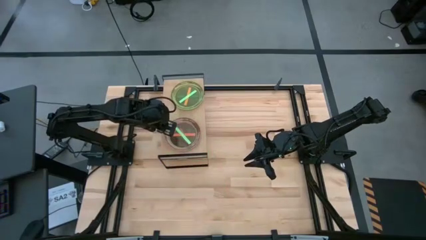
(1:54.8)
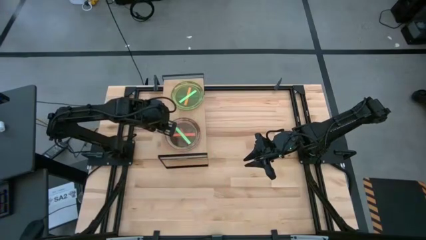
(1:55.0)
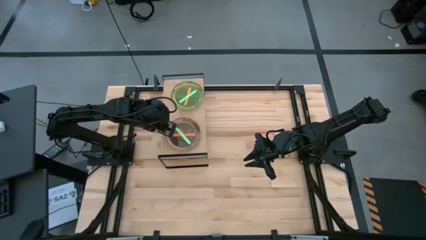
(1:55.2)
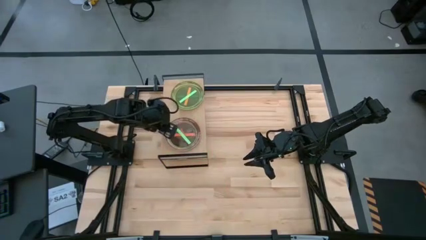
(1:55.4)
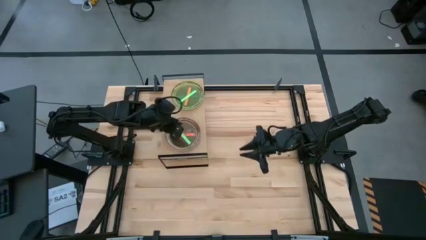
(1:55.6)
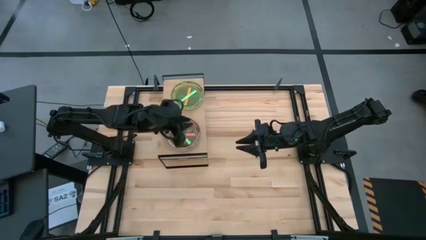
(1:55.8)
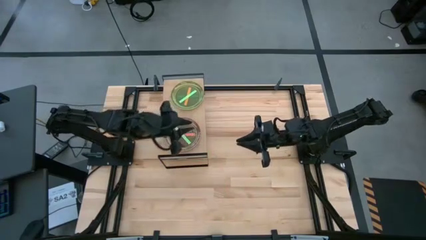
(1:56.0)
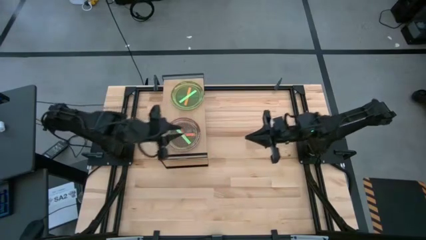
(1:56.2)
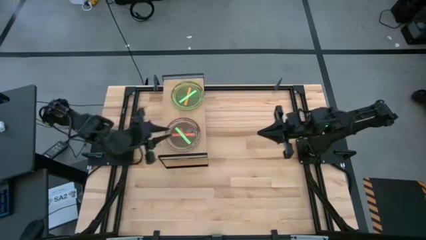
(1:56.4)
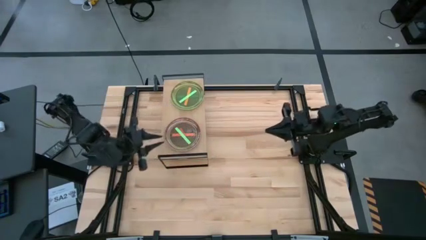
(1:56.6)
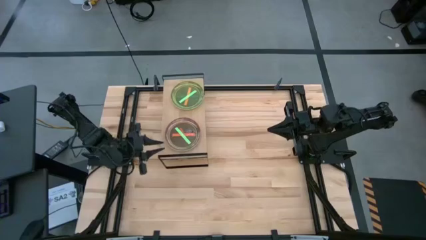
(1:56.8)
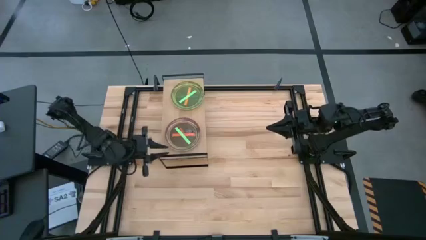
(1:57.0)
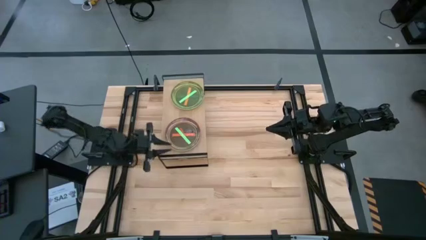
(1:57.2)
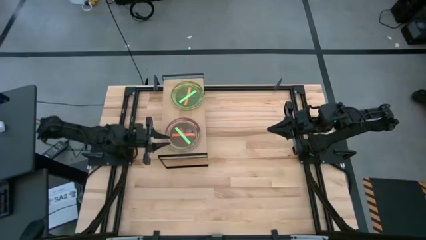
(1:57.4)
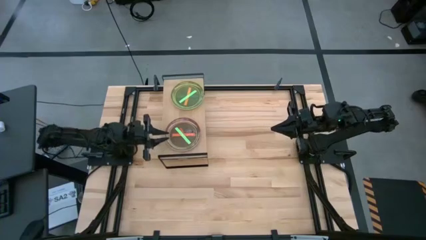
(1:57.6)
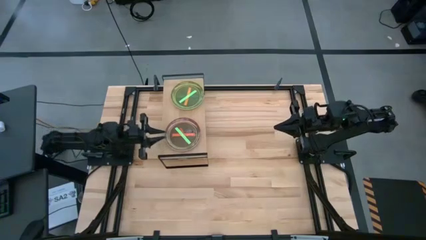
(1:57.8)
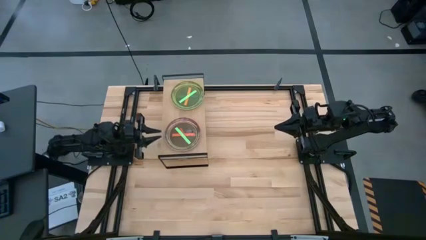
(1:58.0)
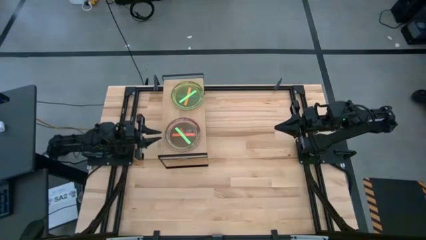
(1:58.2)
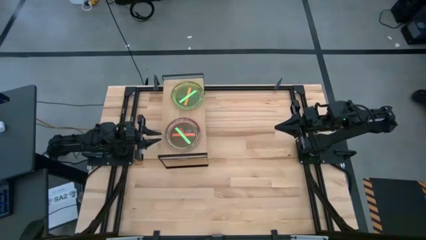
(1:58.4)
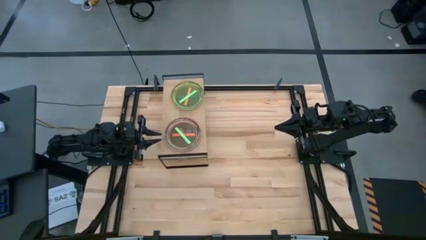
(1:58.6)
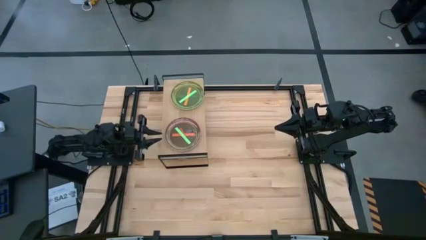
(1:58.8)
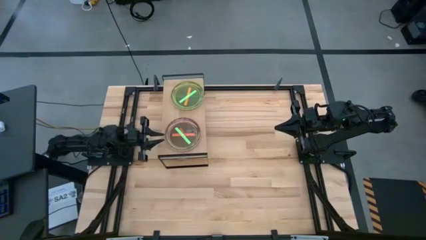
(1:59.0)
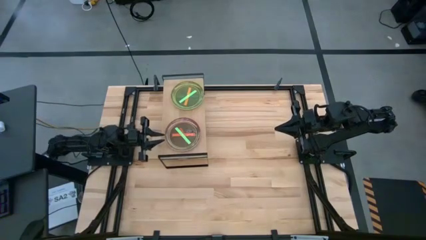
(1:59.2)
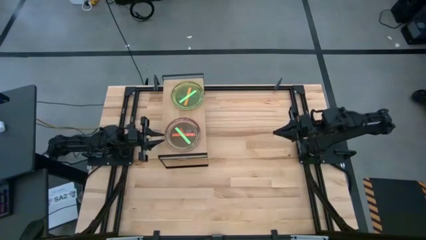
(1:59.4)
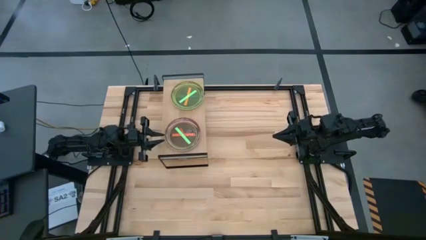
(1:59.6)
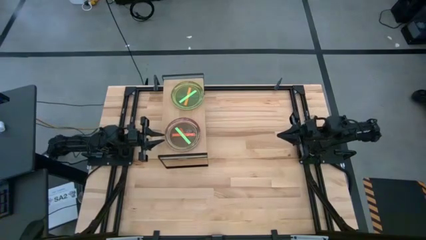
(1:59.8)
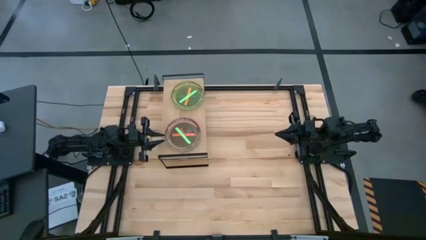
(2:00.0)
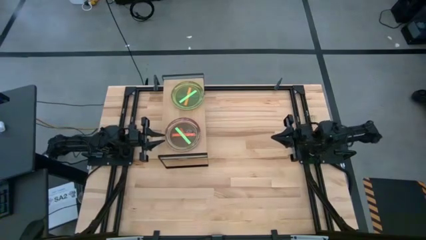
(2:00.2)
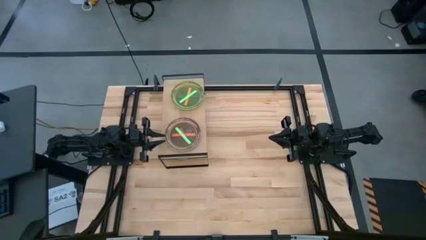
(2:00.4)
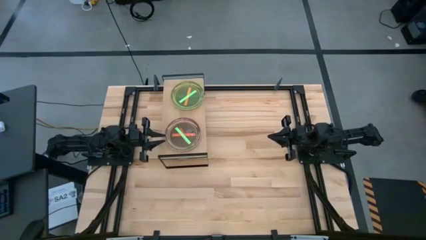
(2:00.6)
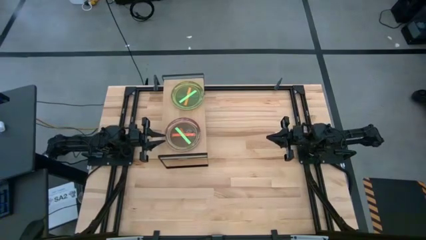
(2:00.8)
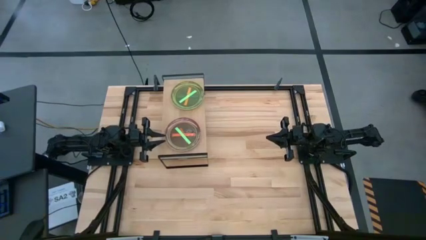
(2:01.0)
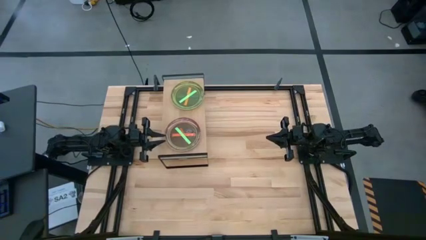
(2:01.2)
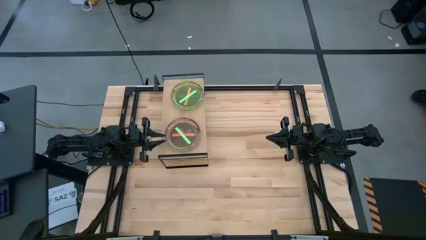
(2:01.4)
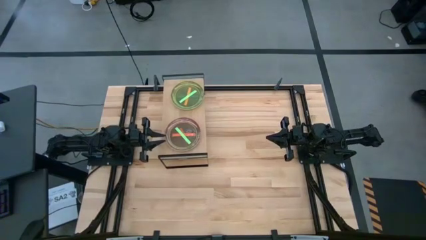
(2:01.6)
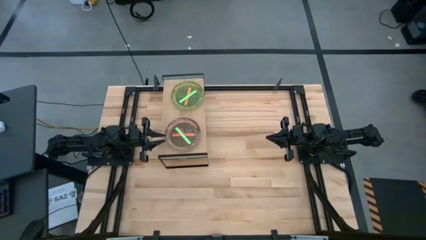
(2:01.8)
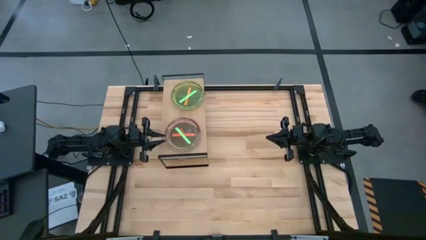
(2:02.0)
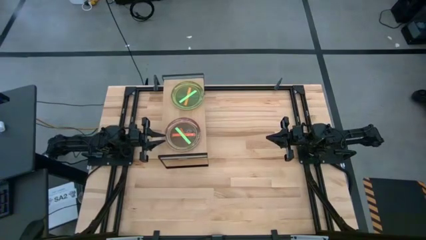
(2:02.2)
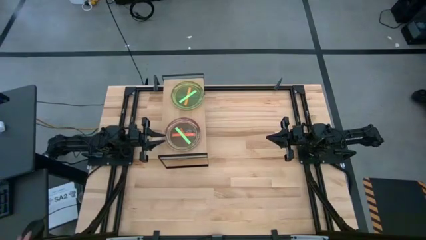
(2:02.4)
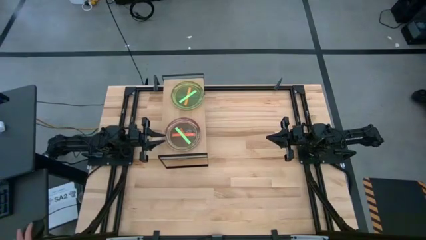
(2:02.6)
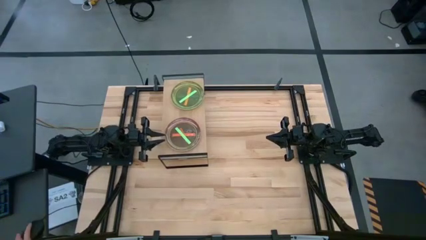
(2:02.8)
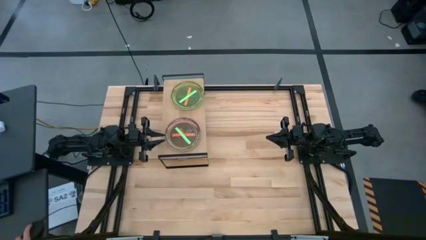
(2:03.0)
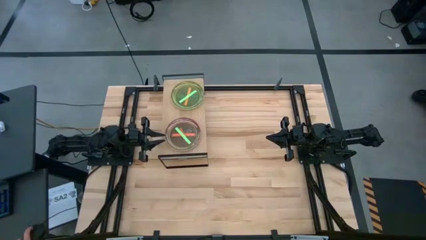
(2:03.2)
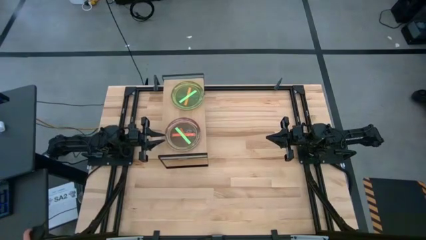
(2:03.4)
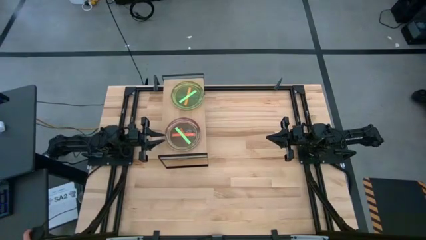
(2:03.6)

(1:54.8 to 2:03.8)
Task: Place and stack plates onto a shelf
Return to Home Position

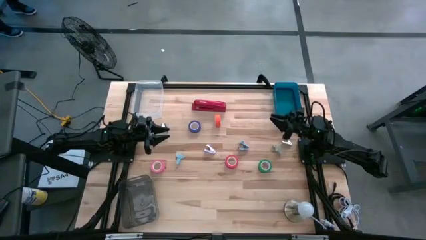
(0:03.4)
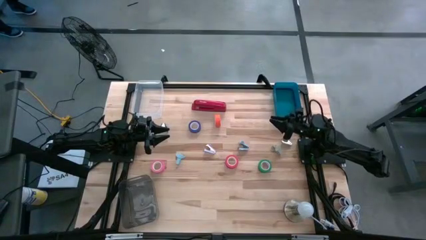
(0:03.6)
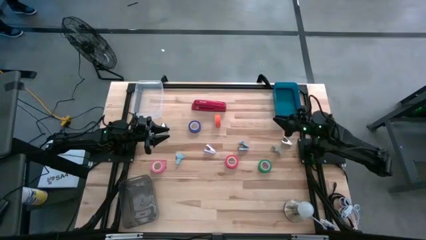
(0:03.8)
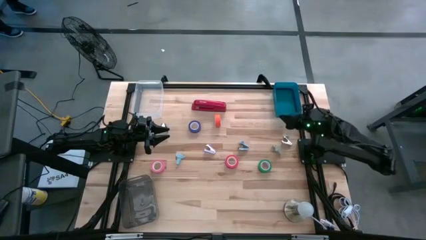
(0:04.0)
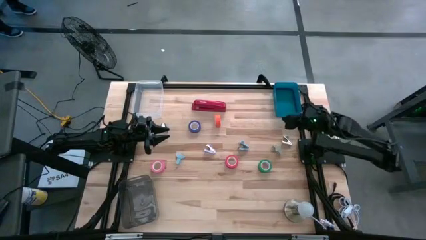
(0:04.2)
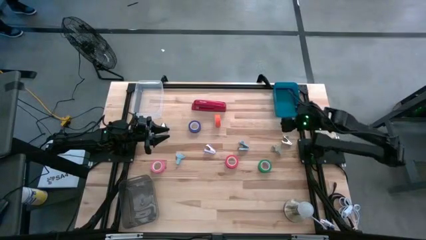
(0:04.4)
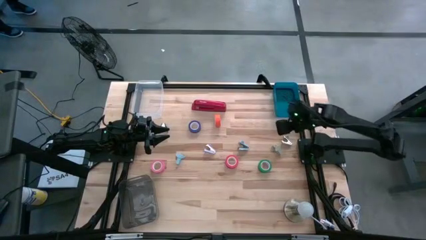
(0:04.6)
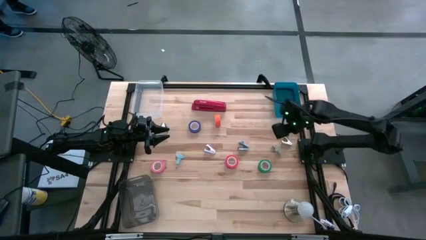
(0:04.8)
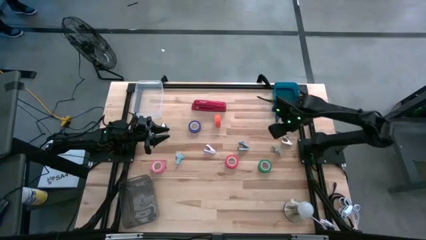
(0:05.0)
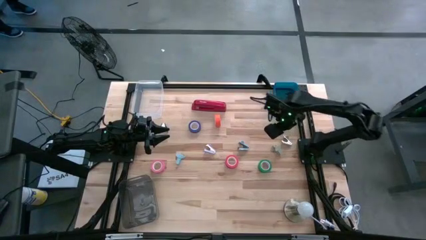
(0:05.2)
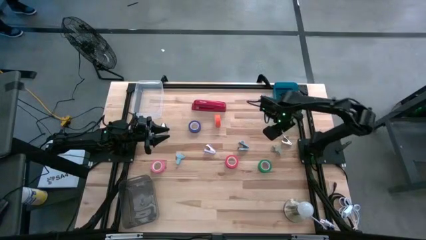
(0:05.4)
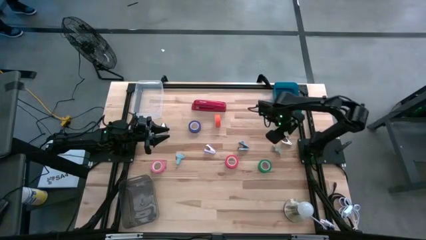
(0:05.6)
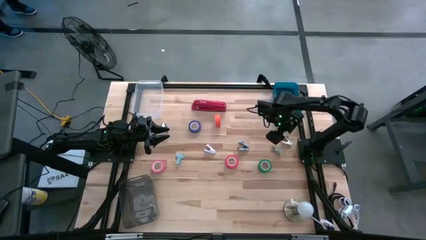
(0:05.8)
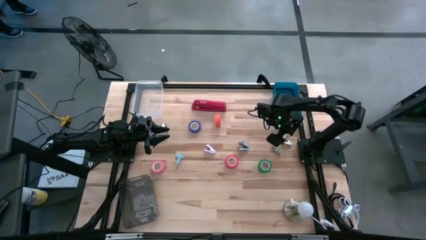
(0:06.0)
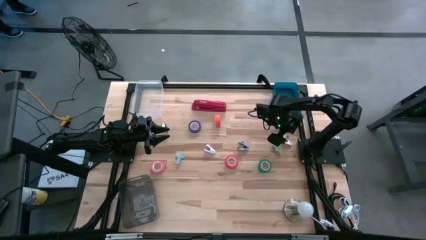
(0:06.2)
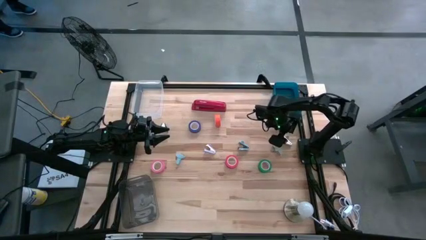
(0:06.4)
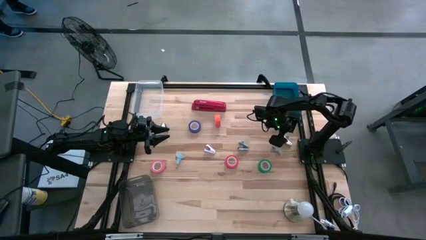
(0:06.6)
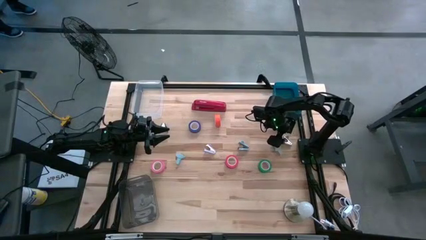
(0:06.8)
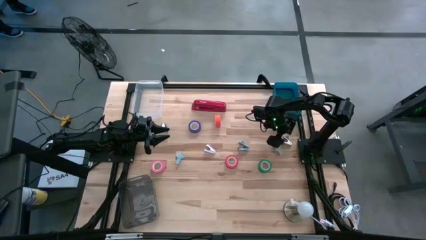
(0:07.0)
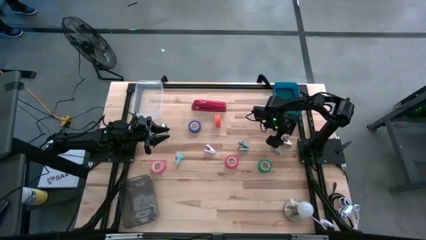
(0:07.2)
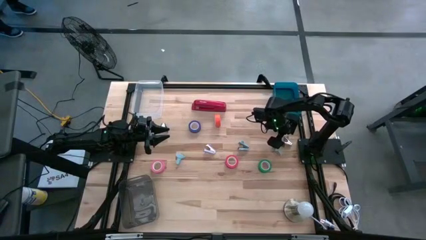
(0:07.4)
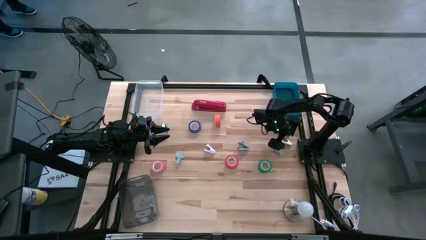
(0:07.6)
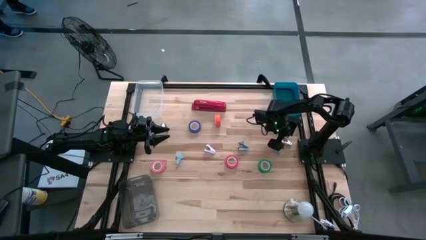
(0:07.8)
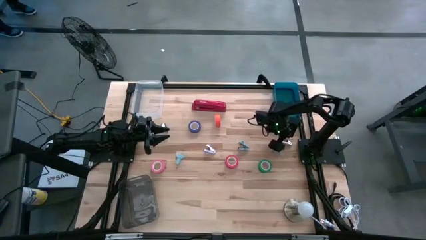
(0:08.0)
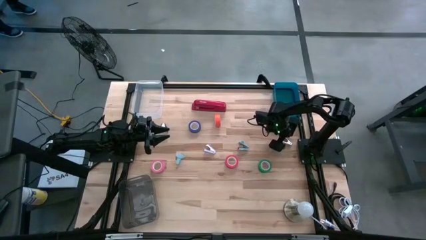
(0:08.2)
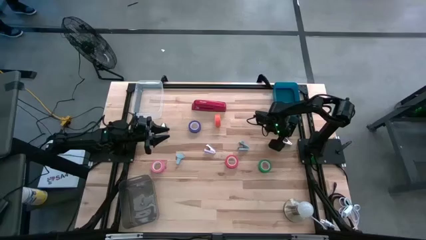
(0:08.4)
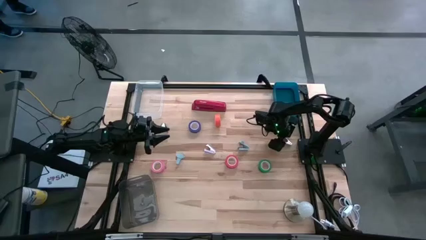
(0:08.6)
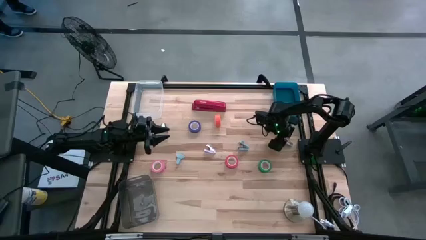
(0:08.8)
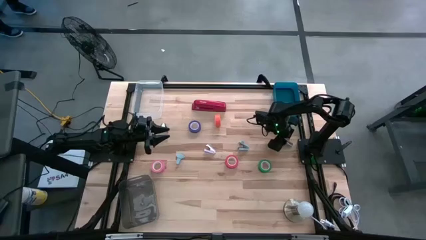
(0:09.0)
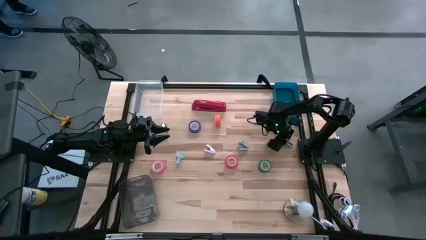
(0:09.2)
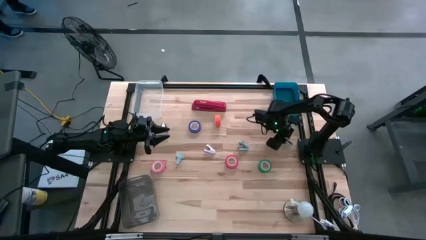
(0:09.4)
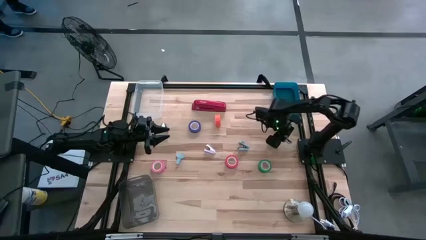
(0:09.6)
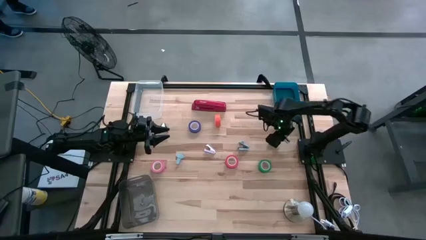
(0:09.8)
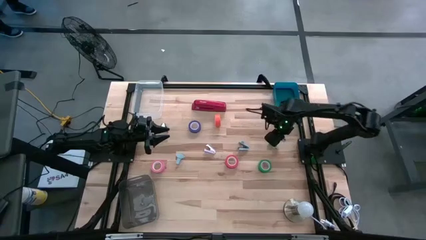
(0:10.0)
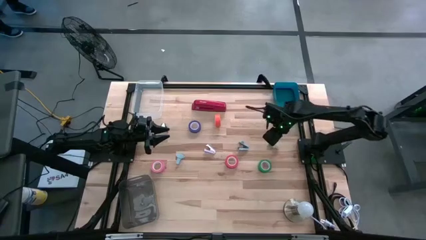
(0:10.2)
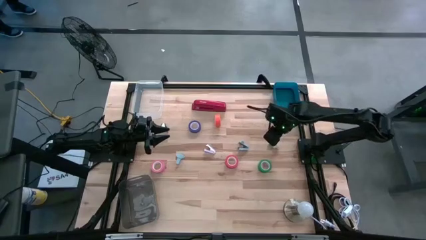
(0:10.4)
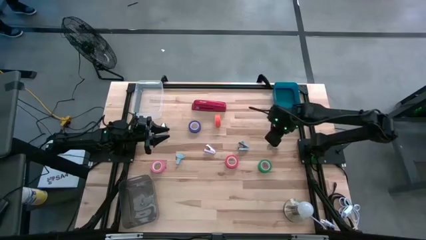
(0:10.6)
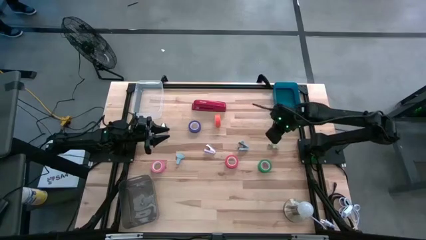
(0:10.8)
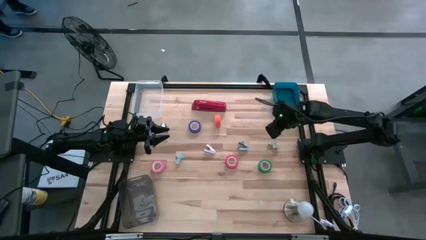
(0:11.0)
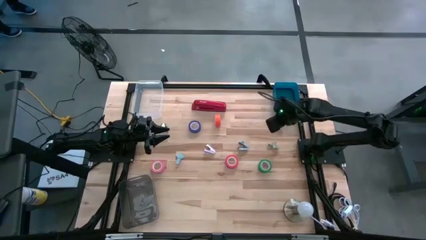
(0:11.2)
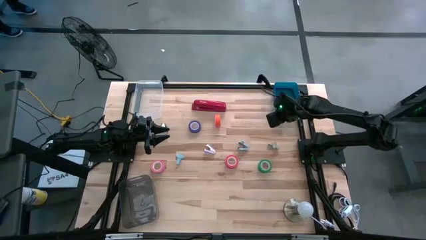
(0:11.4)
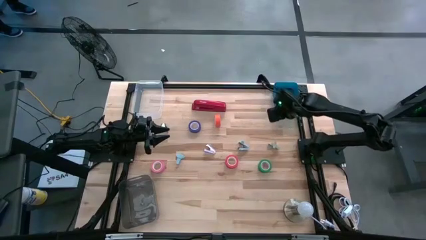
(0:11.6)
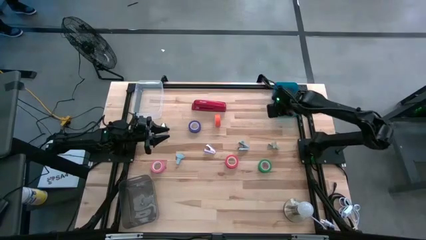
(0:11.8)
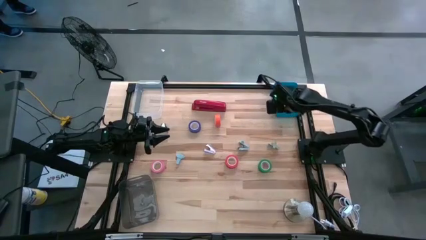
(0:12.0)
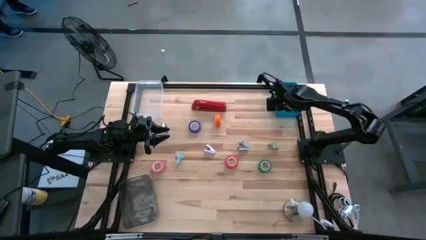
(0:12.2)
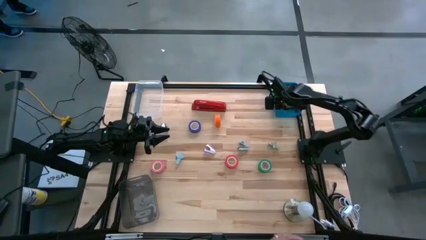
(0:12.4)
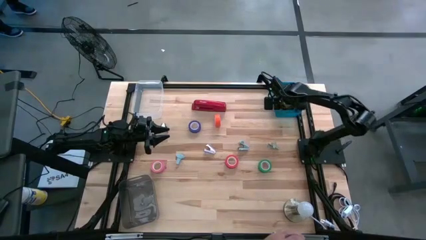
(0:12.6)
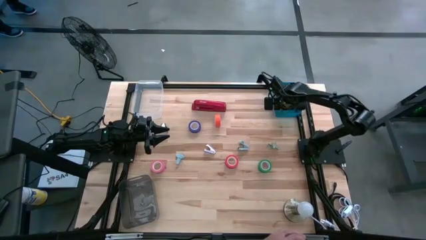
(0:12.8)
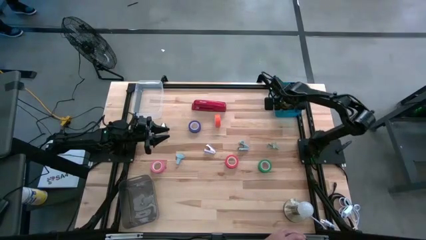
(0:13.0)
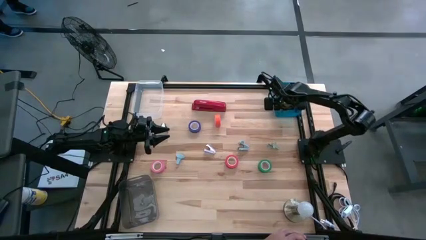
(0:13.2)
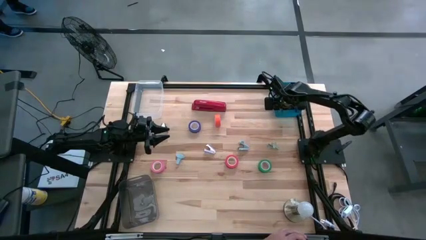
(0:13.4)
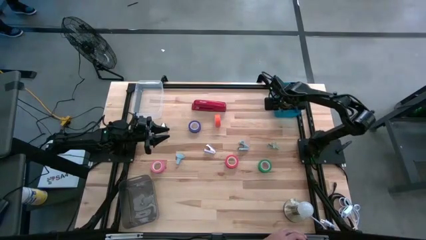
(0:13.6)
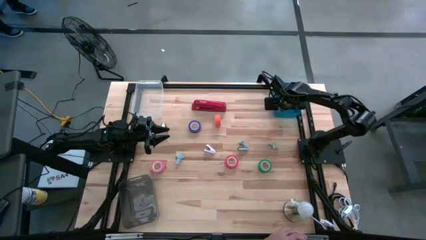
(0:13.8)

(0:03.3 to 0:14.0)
Task: Pick and place Stapler, Stapler remover, tape
Put the right white staple remover into the blue bin
